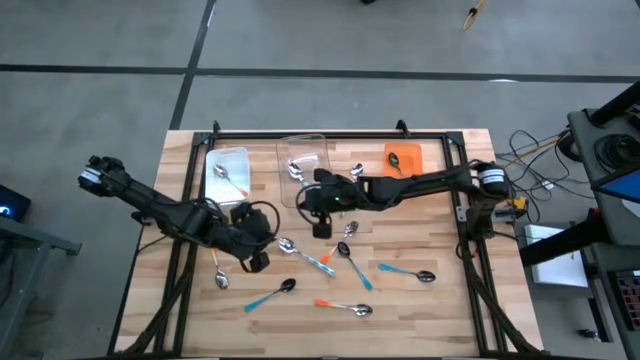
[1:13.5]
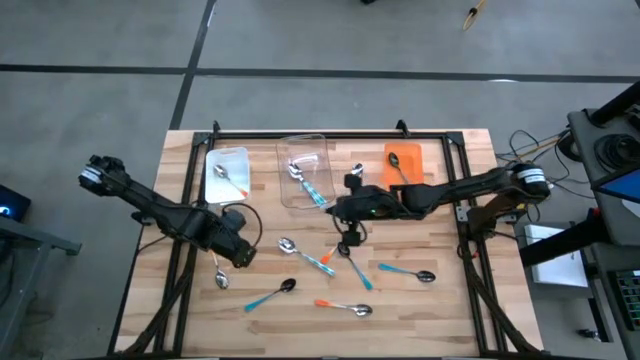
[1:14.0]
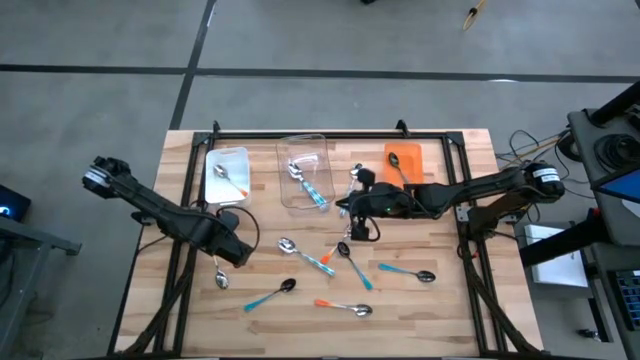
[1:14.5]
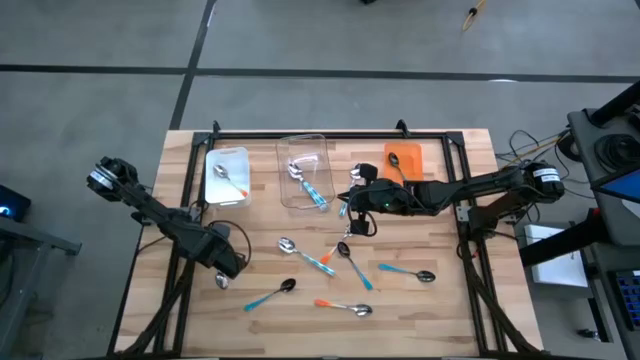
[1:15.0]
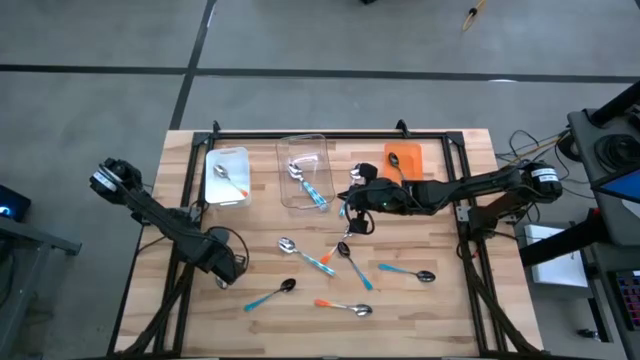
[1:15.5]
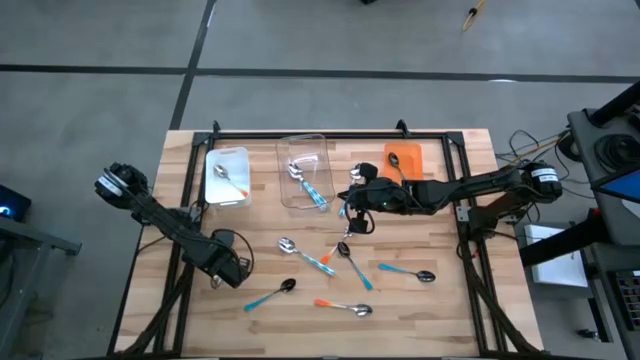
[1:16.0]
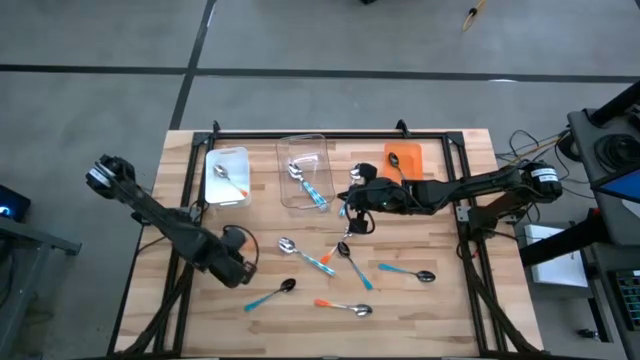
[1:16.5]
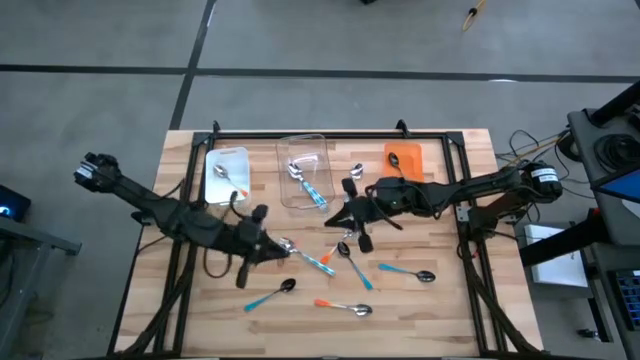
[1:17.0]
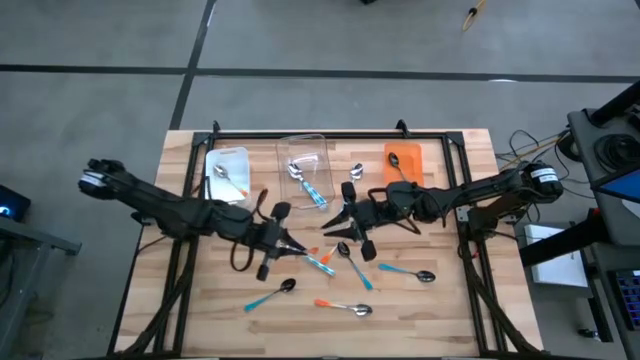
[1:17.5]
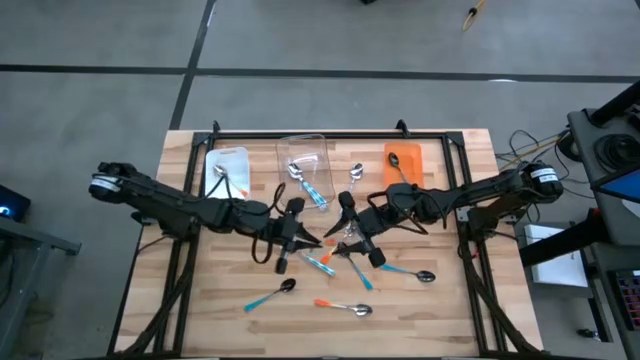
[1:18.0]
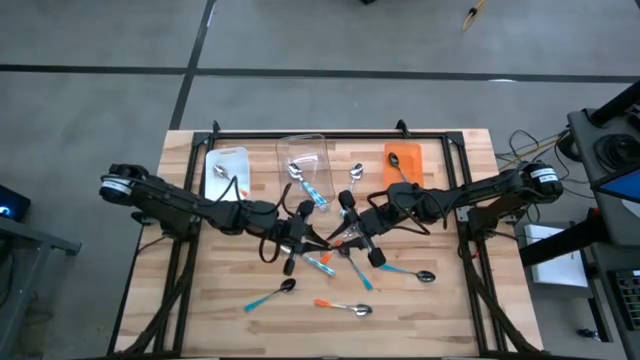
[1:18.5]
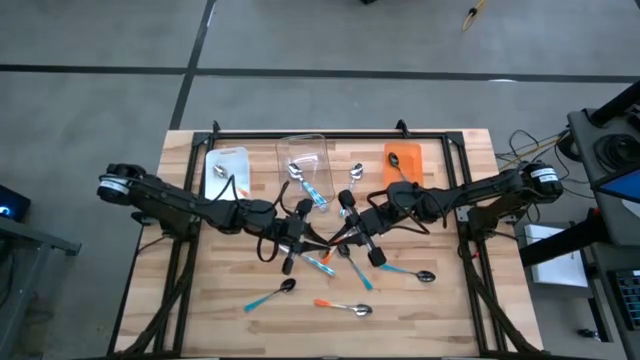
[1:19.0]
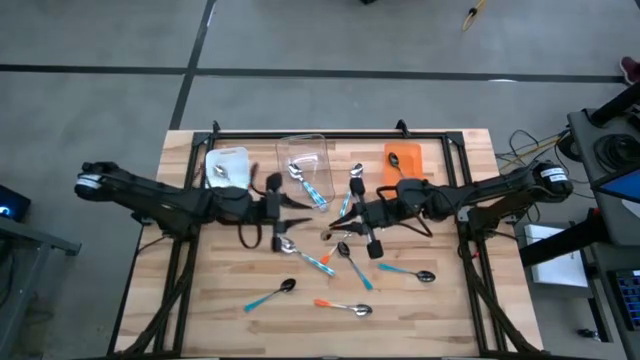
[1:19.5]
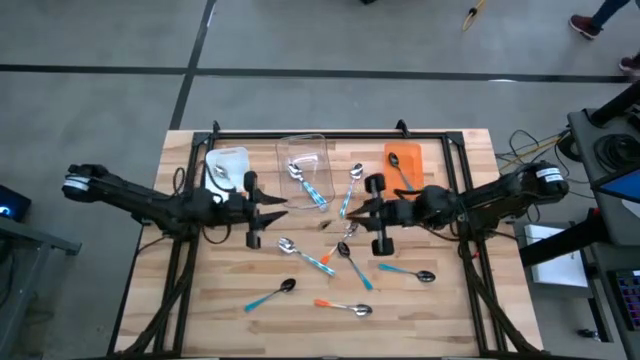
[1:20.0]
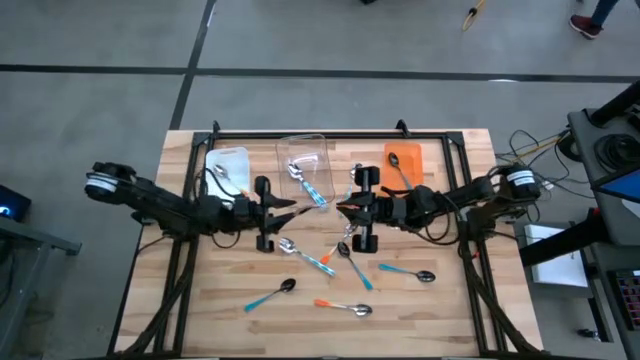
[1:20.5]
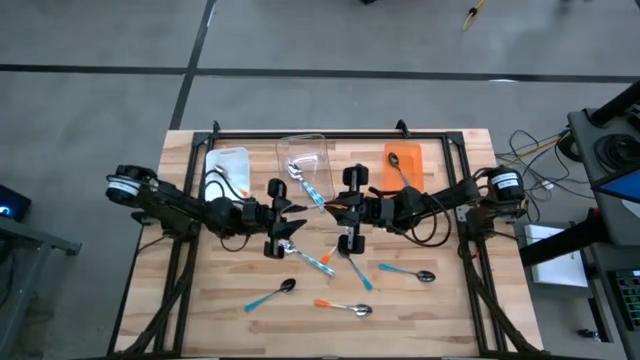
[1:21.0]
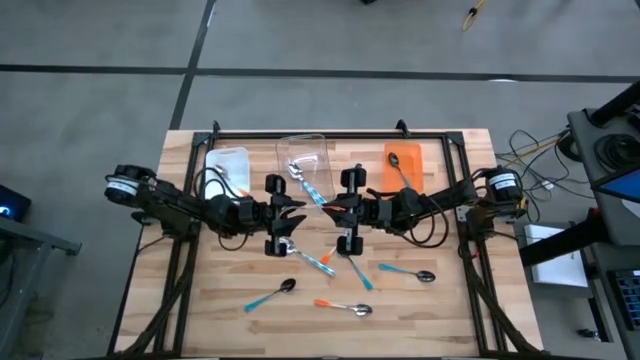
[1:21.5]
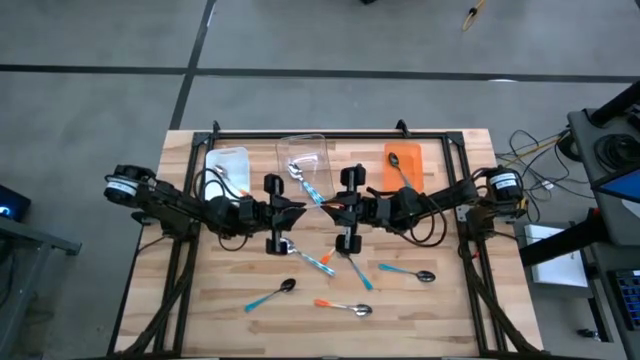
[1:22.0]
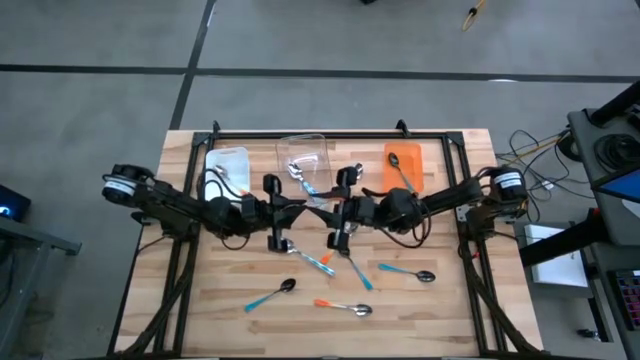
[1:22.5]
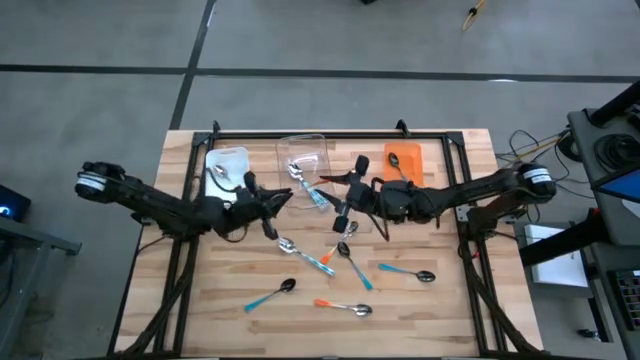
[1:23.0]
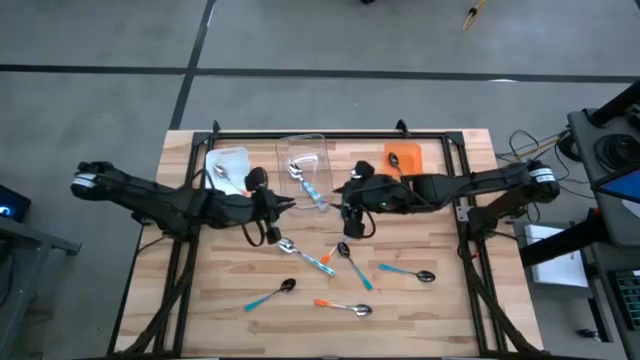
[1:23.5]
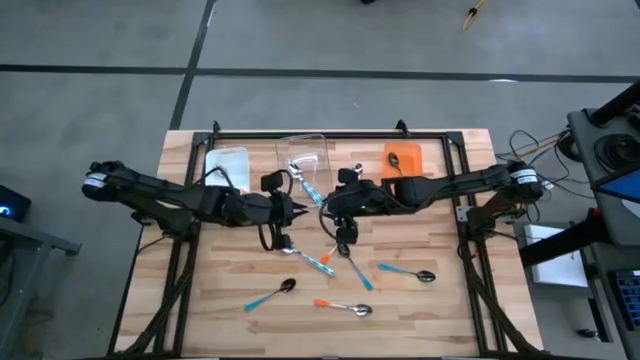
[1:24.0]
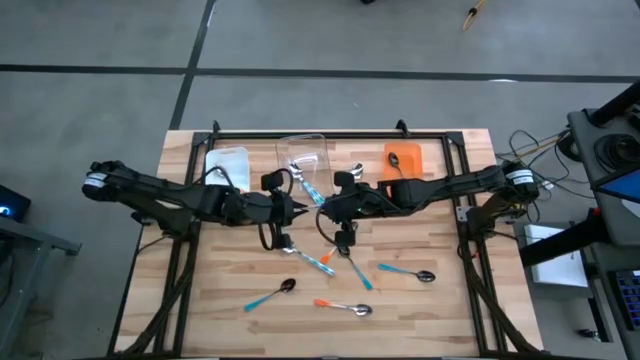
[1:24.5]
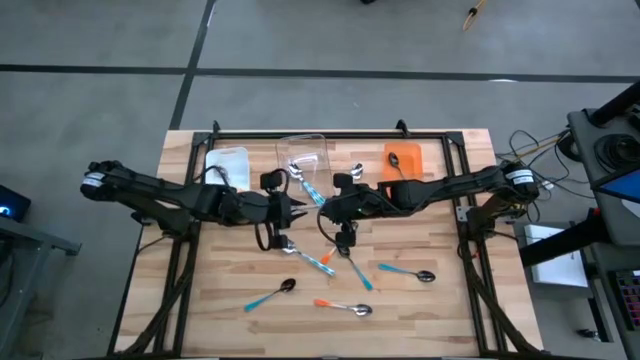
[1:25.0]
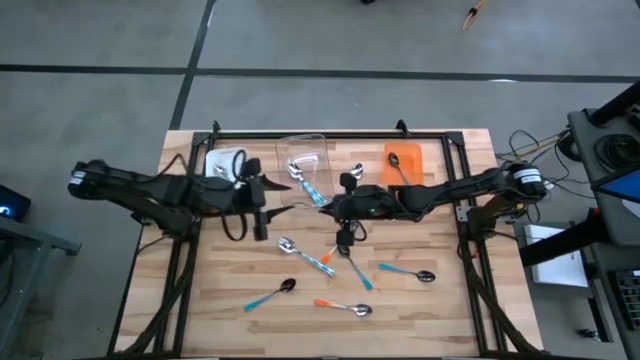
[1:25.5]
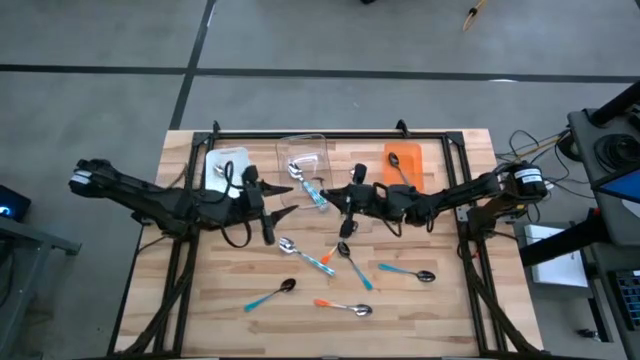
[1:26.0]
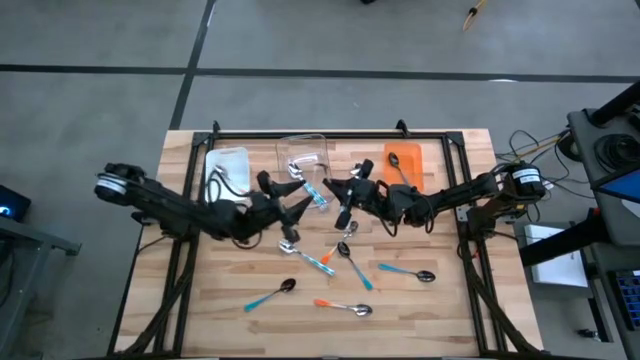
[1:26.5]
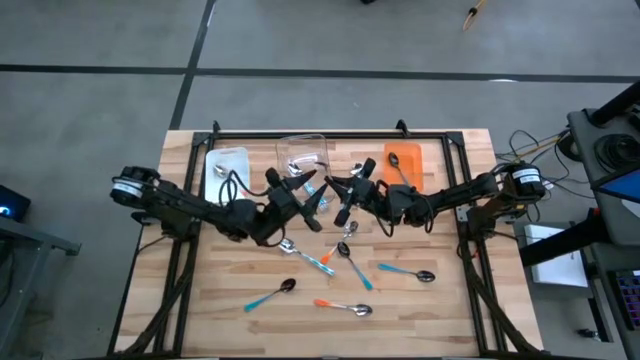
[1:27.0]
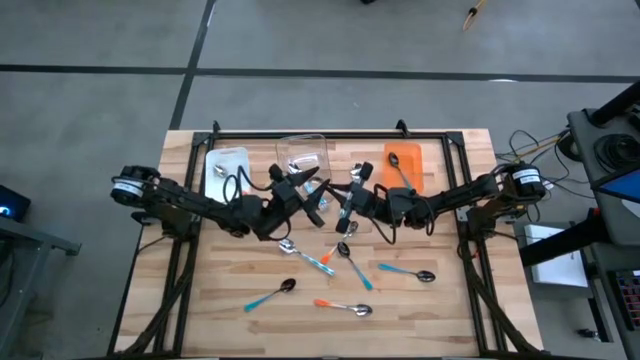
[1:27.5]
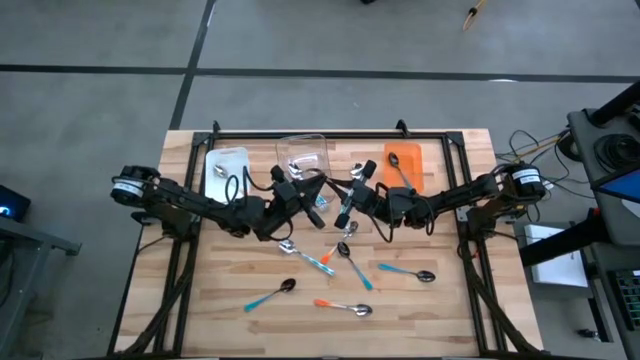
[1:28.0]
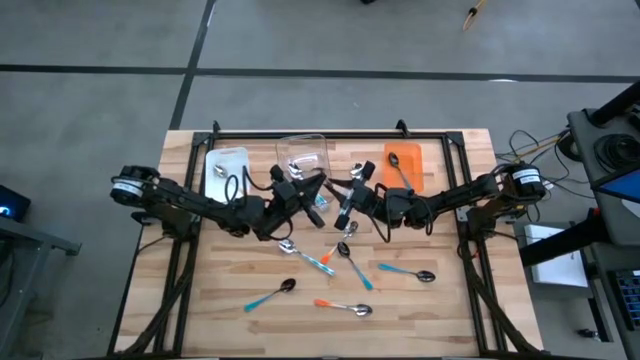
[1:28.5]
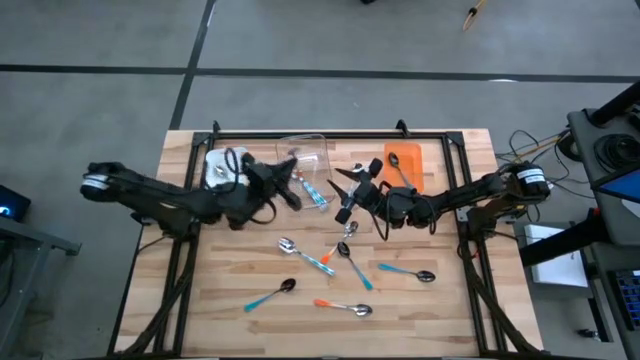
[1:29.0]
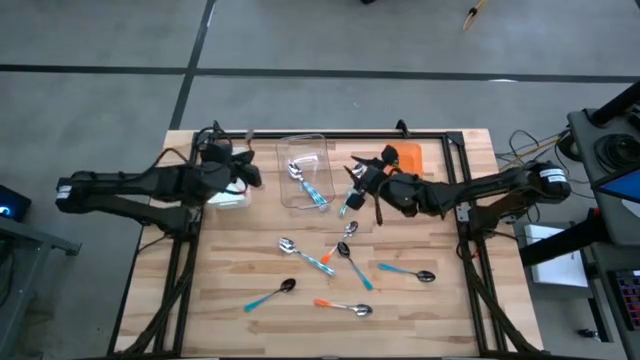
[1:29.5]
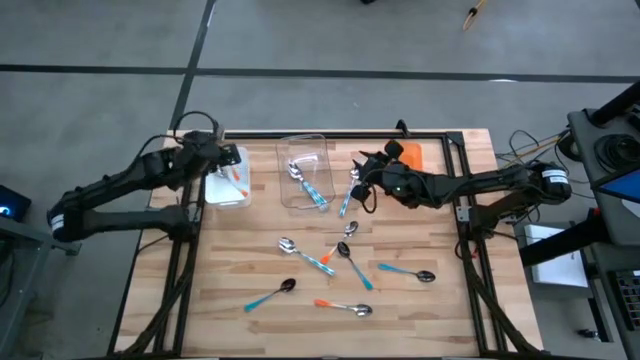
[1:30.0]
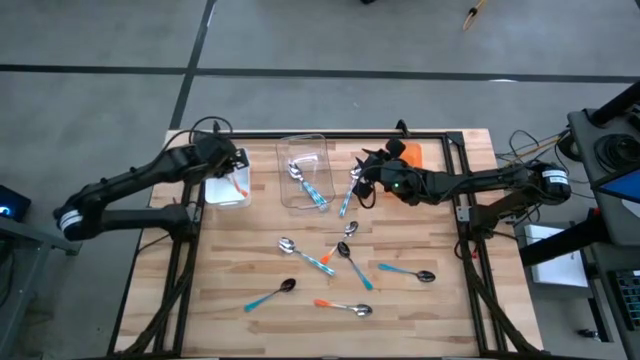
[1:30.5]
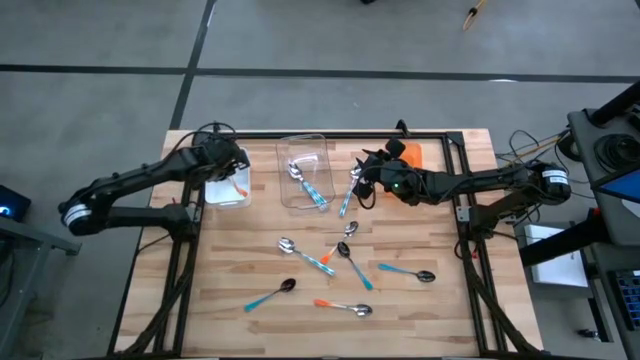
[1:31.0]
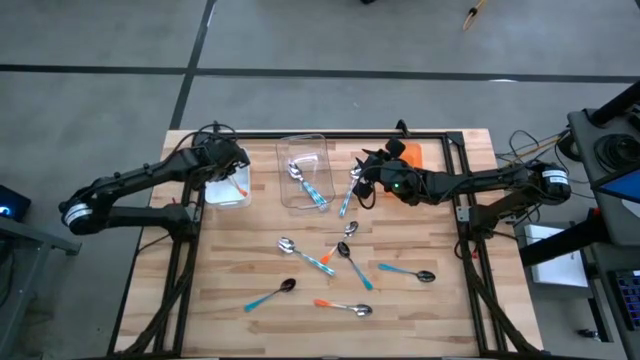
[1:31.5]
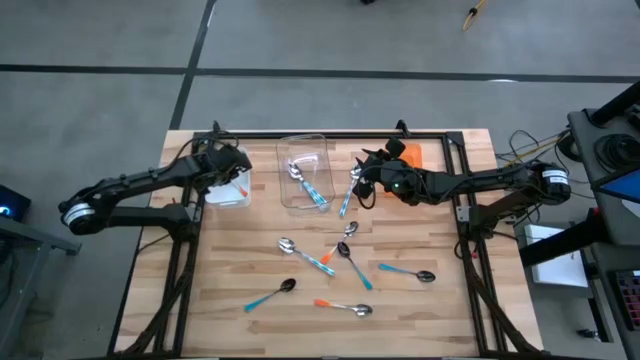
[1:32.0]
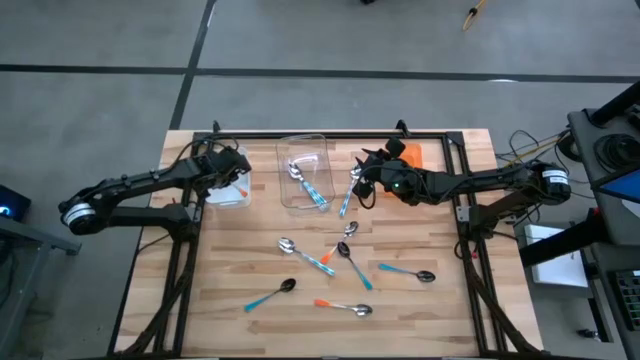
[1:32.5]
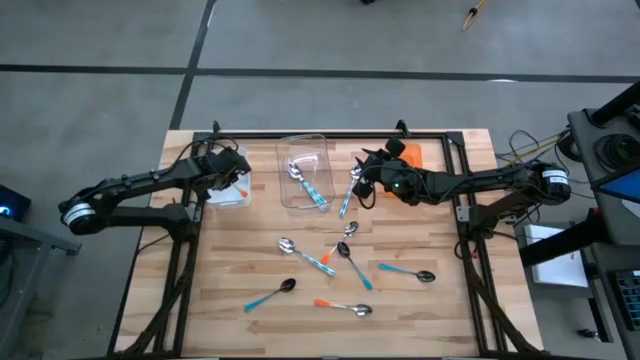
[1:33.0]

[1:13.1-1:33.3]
Task: Sort silverware by color (type)
Put the orange spoon into the white bin

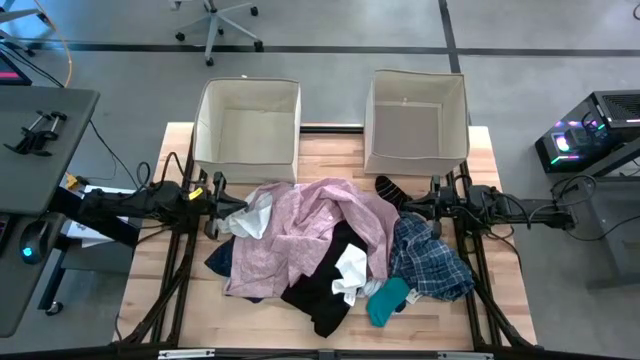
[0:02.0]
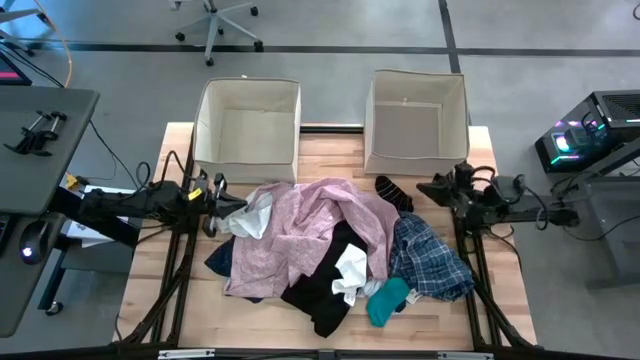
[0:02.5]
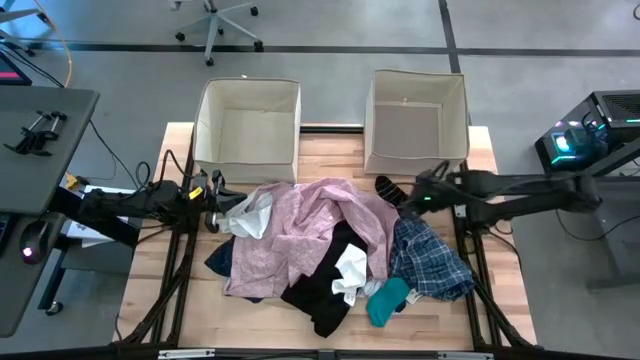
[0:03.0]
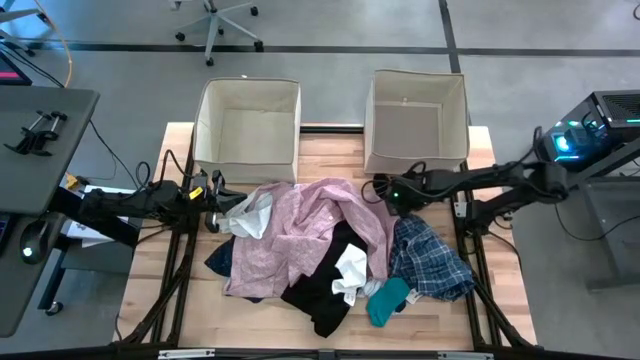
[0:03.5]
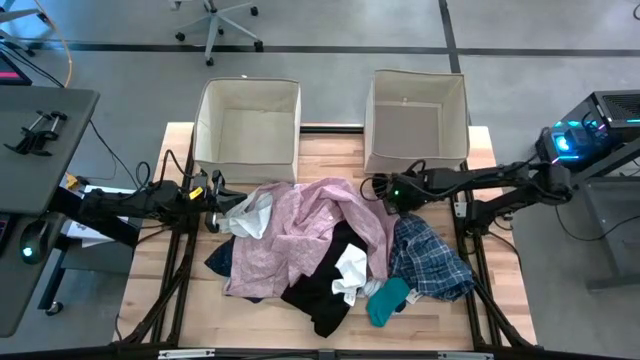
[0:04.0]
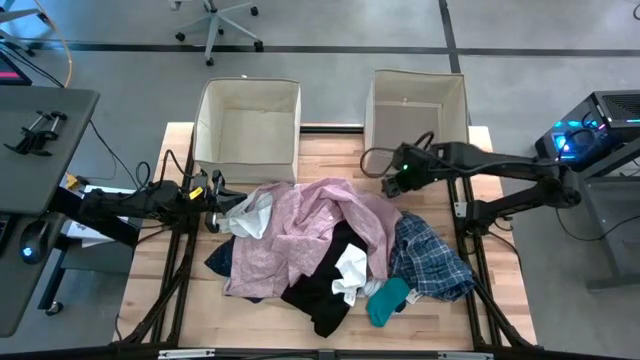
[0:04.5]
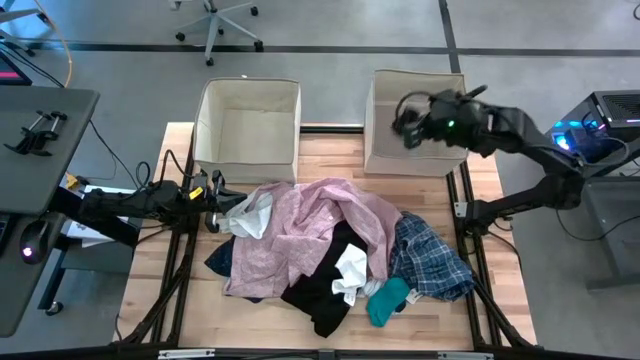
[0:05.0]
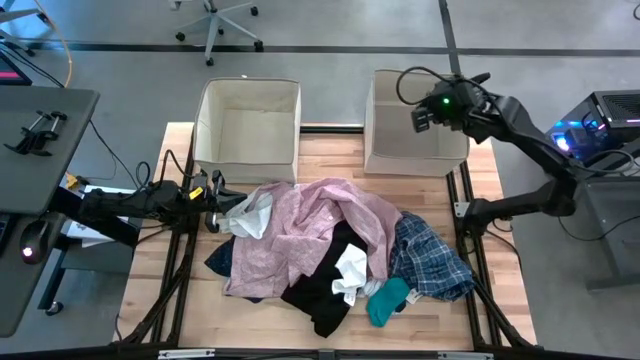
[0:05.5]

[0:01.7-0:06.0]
Task: Sort clothes
Put the black sock into the top right laundry bin
